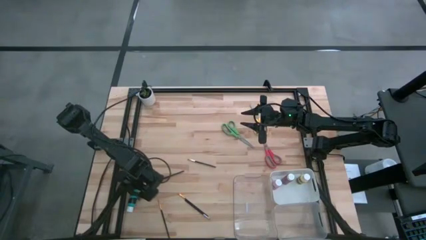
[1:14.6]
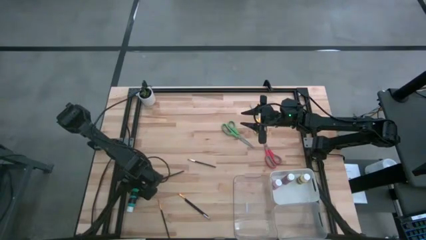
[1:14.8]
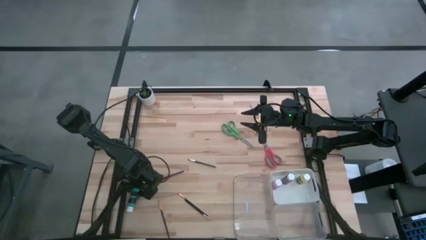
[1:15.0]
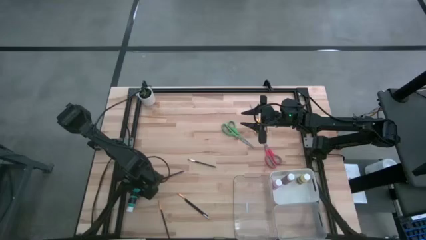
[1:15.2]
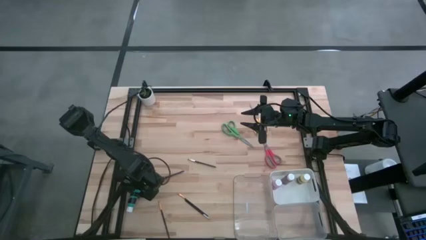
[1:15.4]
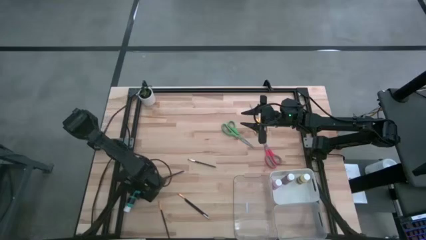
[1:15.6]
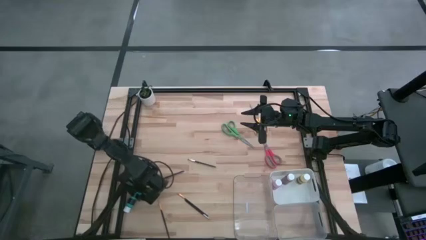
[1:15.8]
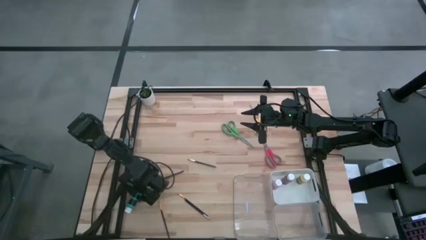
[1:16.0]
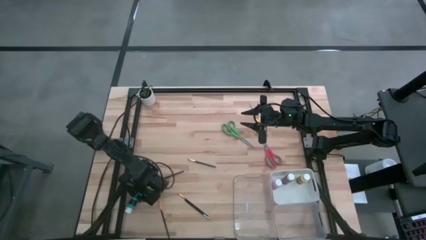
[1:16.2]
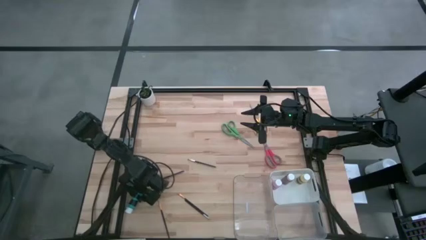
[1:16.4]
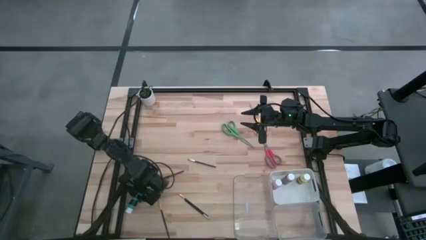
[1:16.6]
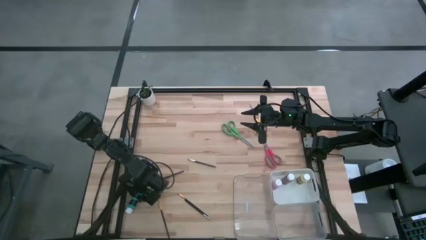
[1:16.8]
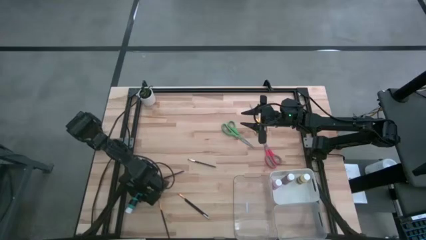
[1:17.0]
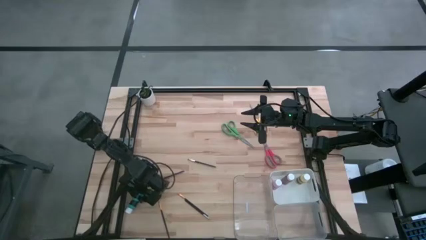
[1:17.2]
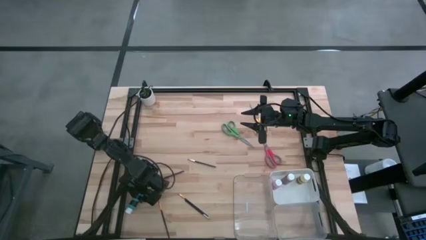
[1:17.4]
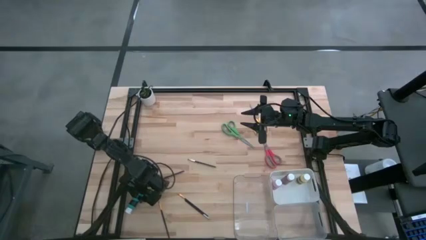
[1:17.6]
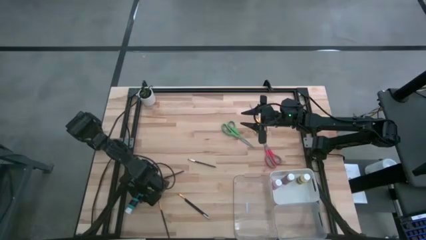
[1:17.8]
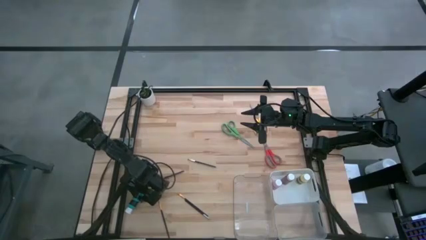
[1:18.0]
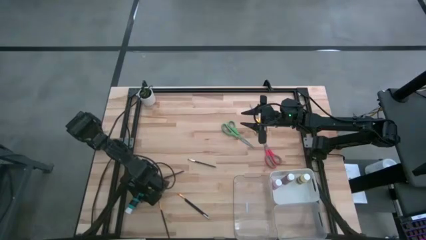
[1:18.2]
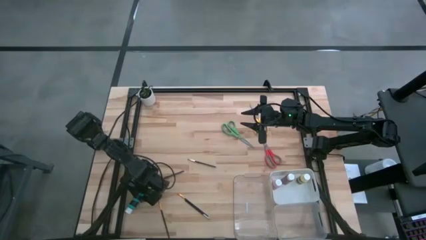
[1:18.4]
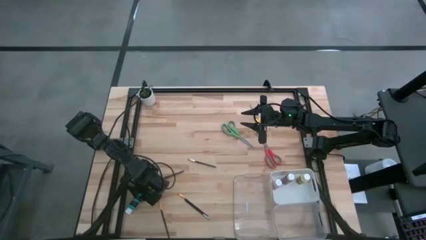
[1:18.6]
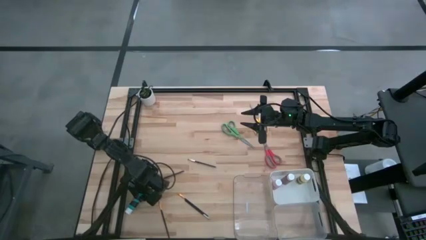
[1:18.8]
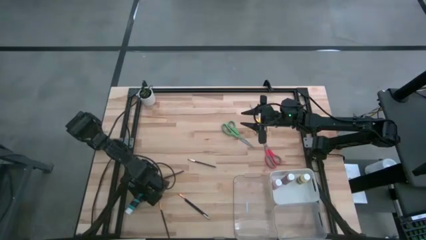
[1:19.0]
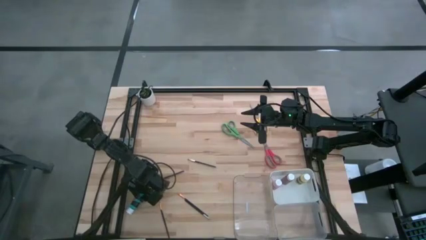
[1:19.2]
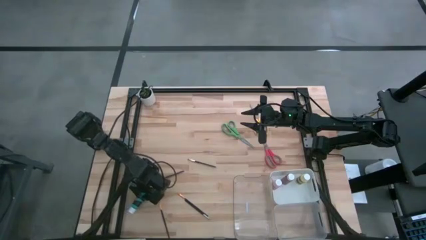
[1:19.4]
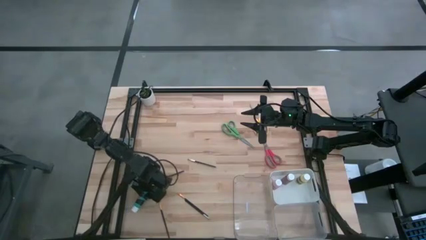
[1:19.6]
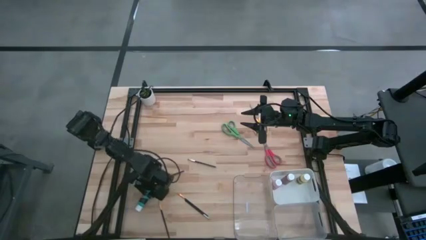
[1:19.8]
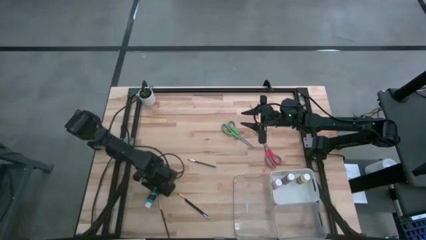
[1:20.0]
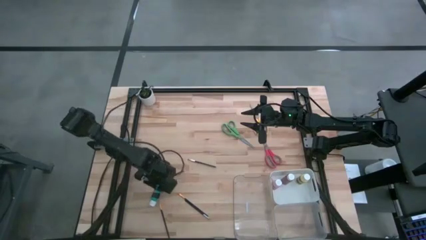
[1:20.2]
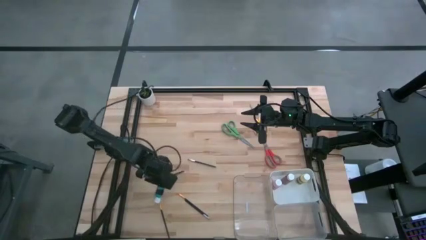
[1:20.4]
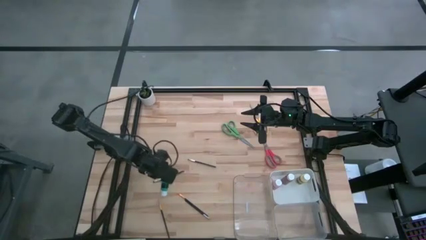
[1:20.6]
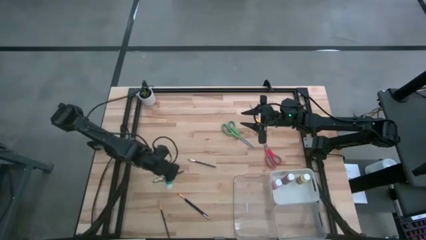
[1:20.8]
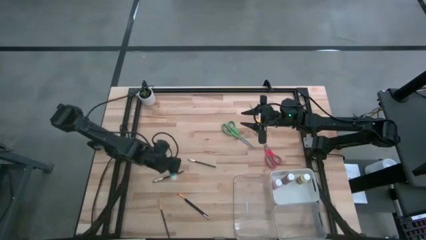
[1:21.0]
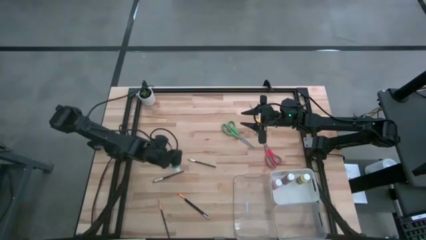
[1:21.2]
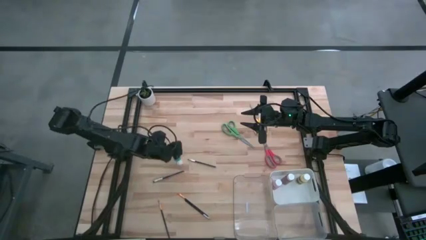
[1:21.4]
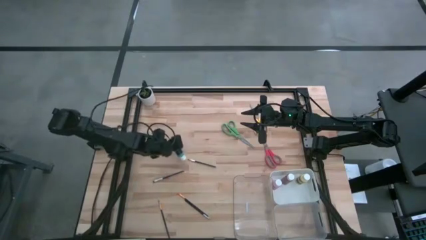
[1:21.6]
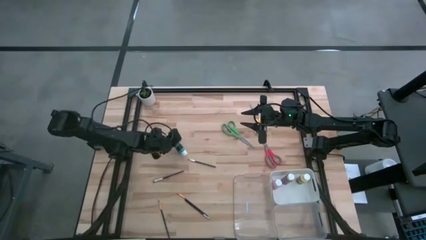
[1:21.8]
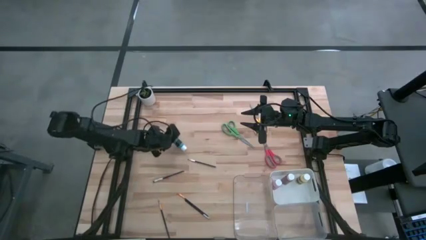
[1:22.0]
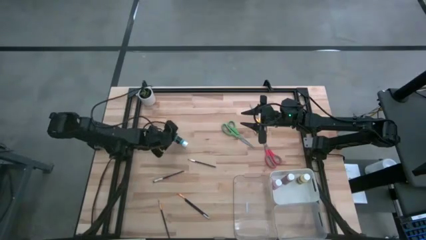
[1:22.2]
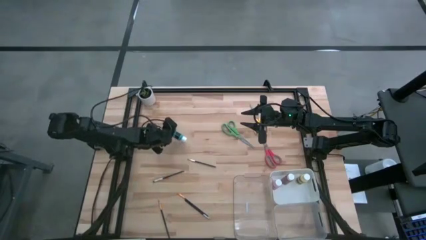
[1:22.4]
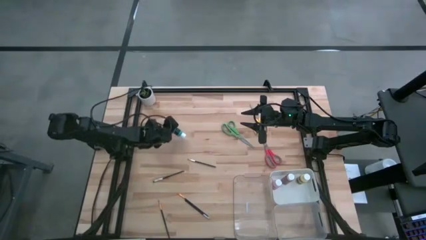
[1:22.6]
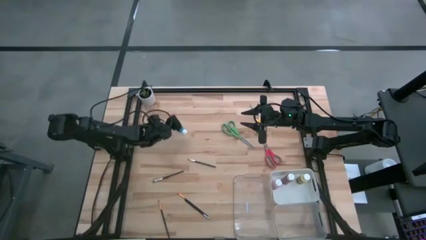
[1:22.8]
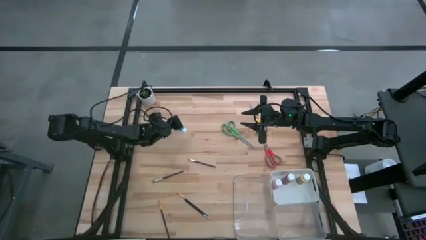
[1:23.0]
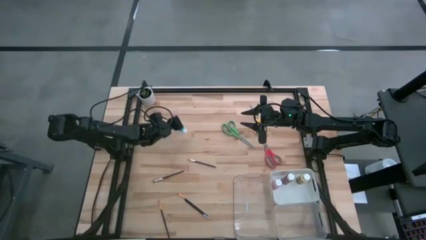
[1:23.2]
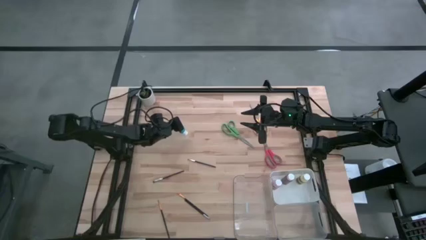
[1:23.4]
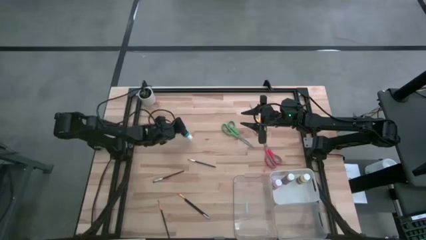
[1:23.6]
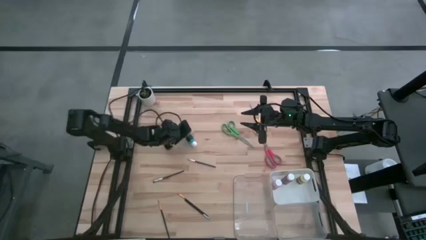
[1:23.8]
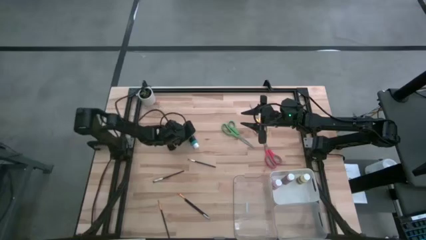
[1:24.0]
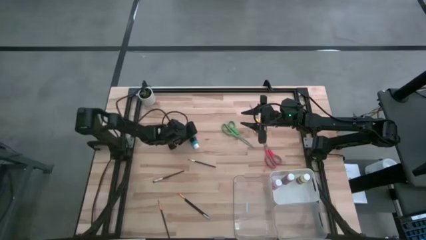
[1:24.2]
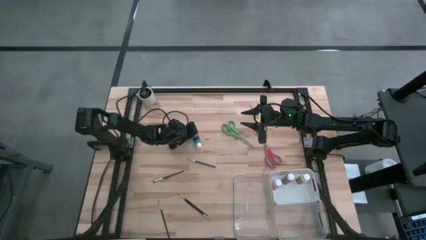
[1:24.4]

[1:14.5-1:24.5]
Task: Pick & Place Paint Supplies
Put the blue paint bottle into the white bin

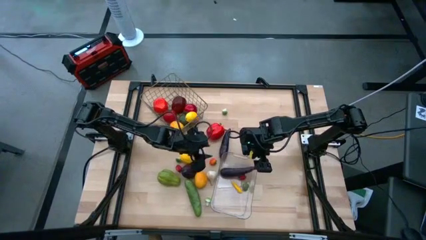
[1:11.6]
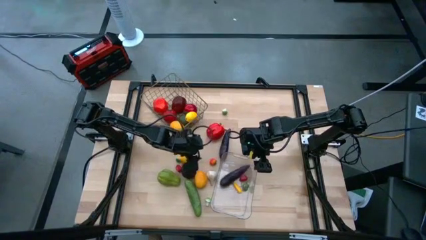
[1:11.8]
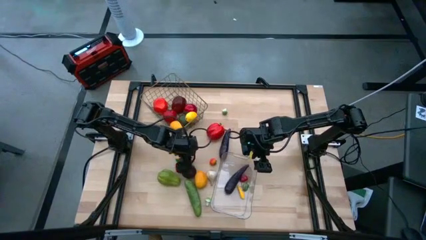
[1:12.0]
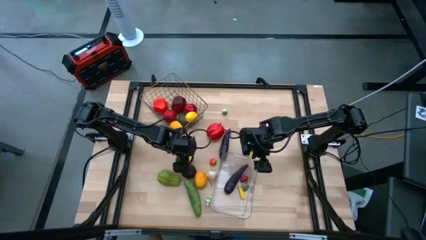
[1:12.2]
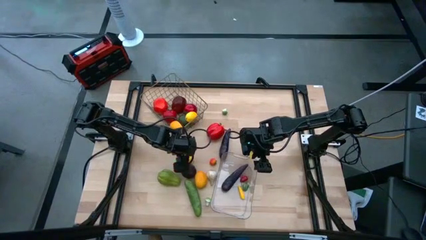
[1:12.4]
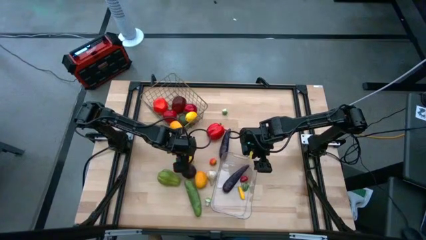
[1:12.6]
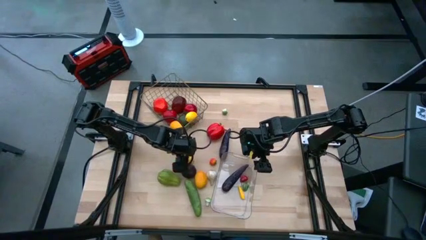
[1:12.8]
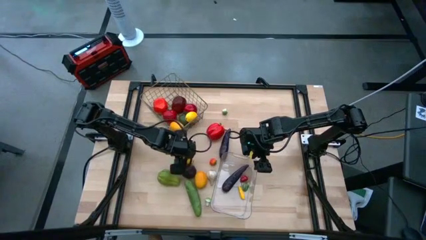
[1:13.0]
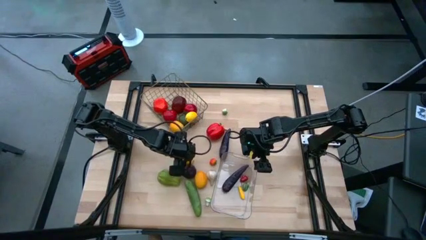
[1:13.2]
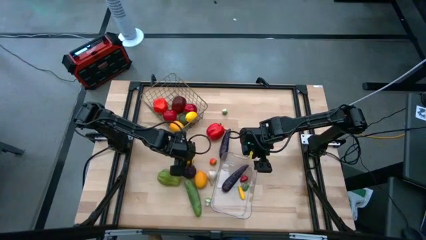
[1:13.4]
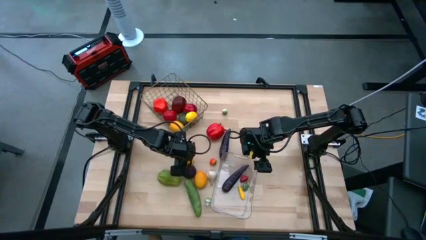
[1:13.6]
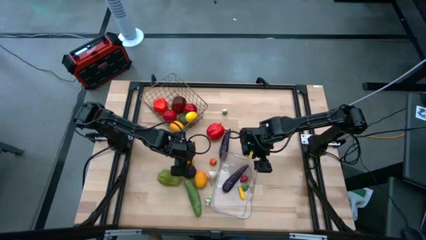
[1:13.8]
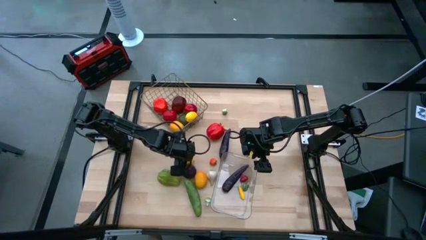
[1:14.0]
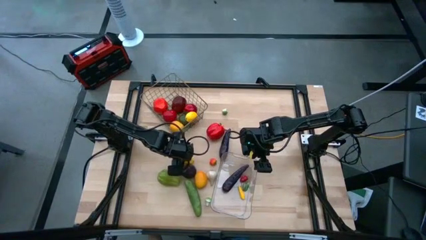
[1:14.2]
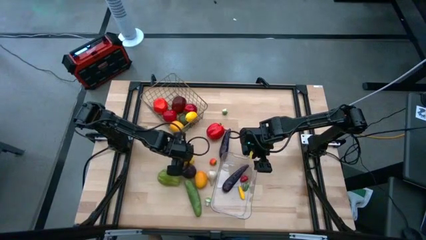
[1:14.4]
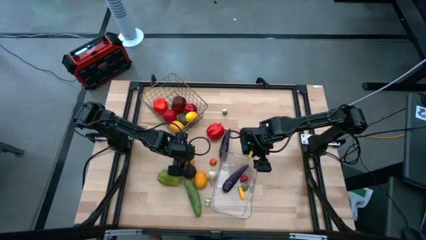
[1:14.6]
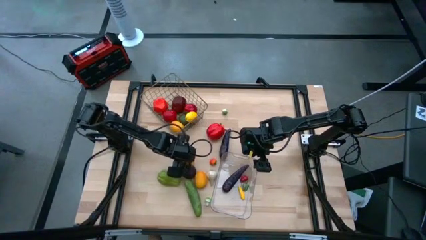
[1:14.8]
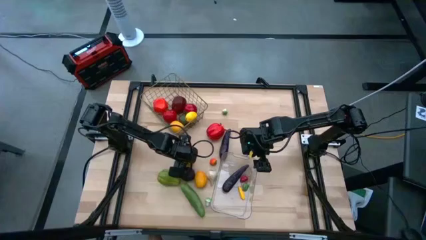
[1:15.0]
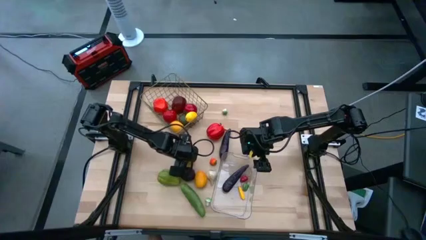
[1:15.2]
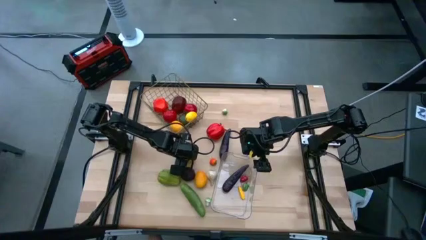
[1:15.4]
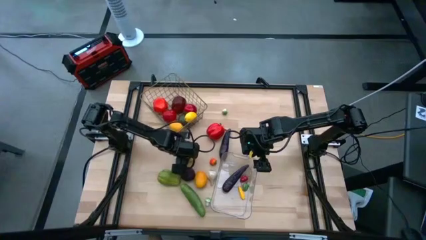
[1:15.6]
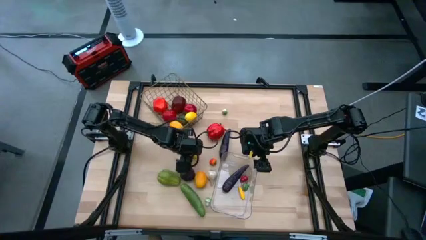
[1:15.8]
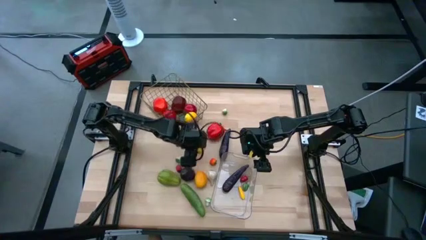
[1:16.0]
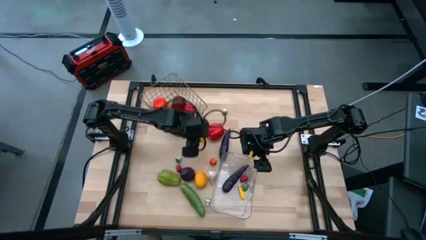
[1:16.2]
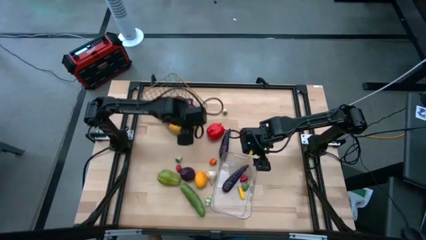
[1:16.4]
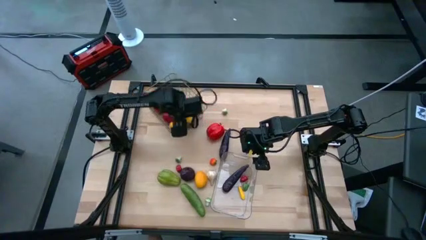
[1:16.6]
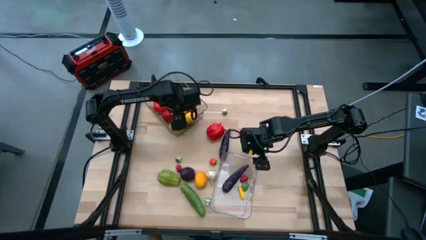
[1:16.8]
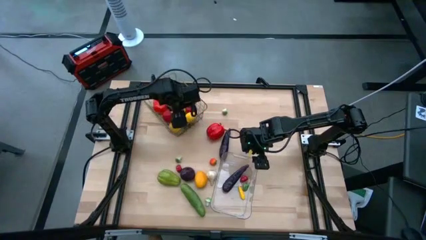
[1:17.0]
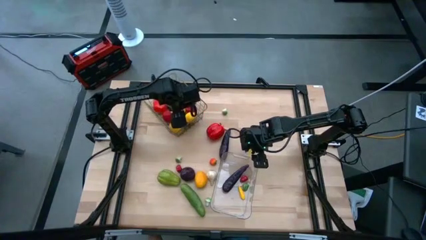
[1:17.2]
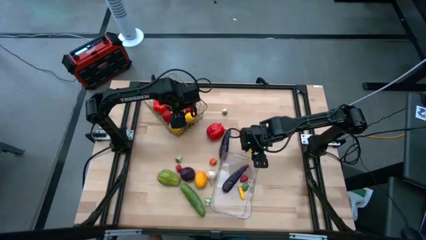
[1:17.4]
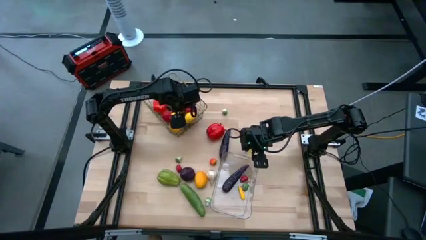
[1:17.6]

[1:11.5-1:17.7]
Task: Sort produce into baskets
Put the yellow lemon into the wire basket

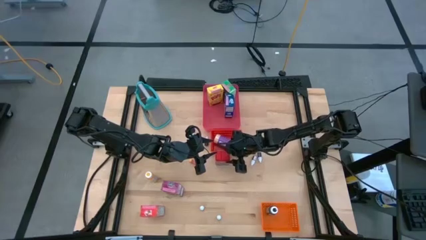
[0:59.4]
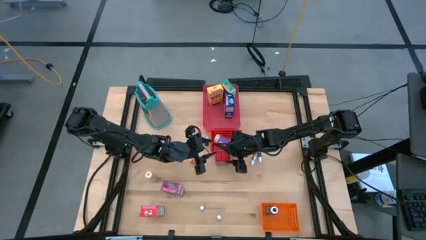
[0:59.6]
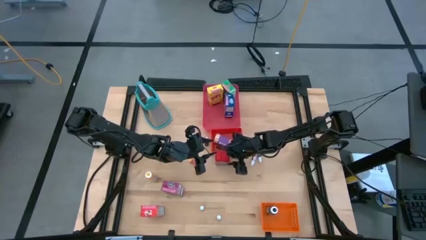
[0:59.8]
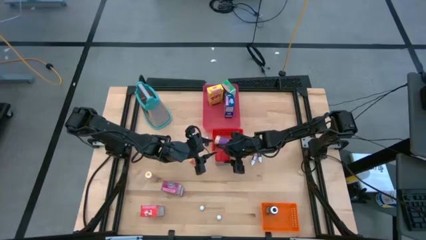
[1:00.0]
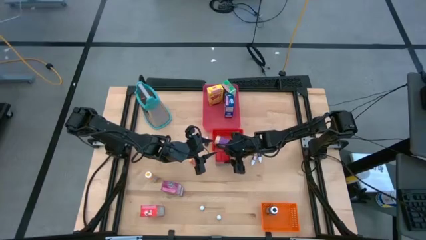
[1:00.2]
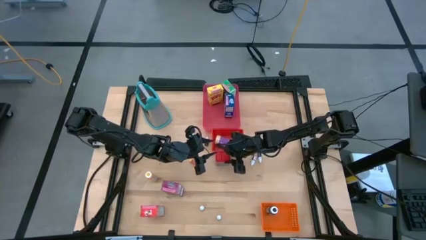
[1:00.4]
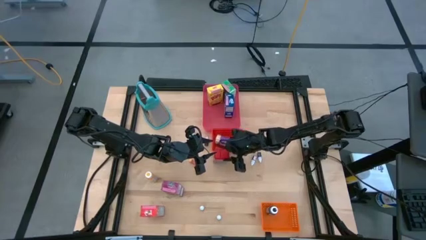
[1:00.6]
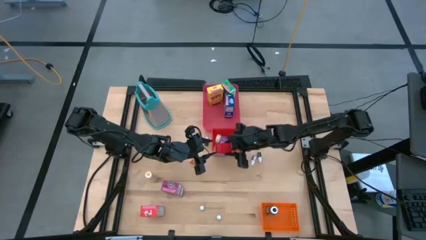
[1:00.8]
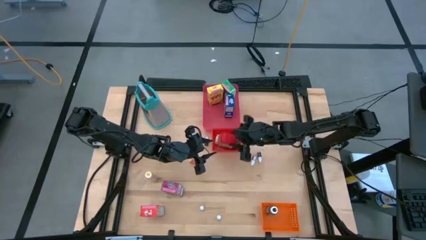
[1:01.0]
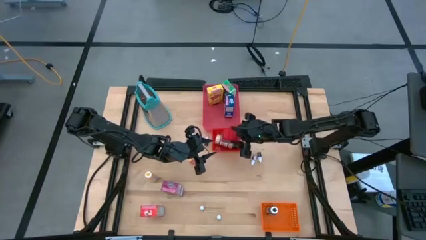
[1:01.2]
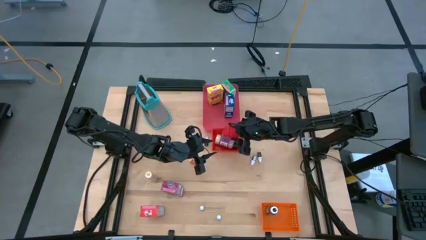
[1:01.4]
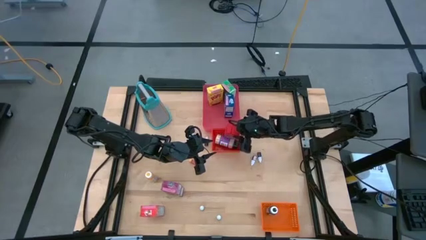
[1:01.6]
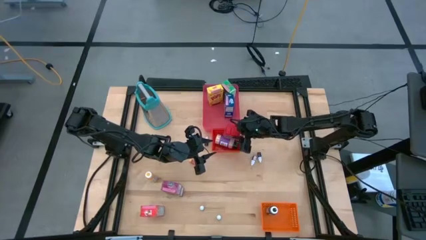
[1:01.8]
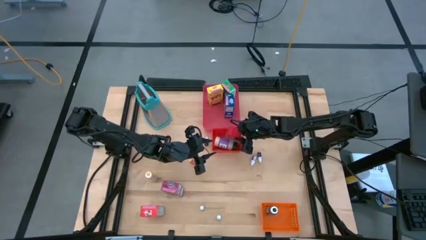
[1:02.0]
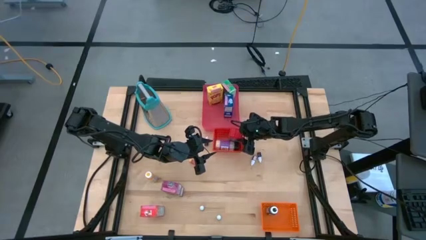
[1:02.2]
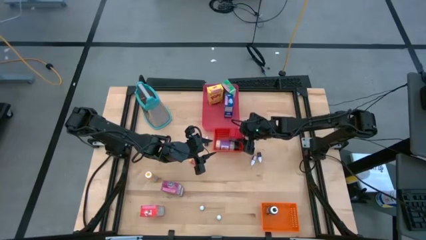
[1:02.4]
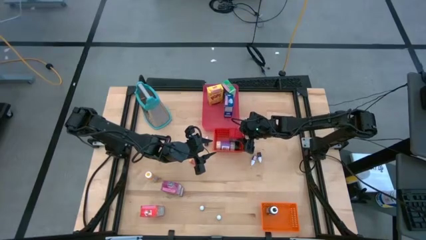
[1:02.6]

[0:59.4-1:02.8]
Task: Pick & Place Kitchen Items
Put the red seasoning can into the red bin
